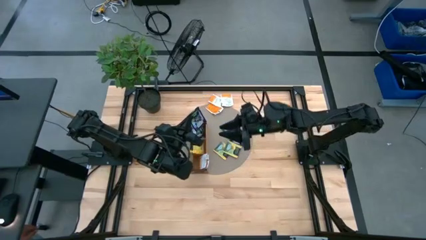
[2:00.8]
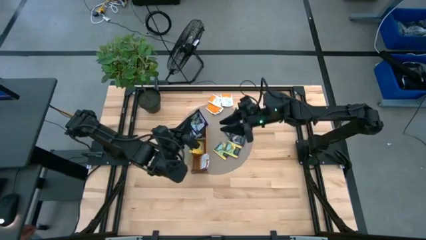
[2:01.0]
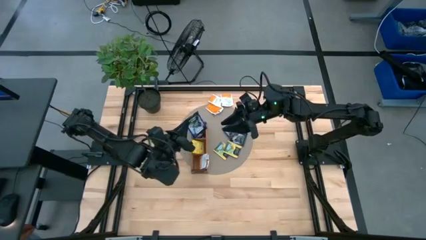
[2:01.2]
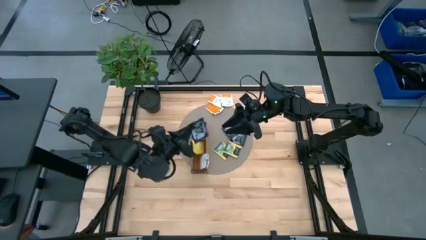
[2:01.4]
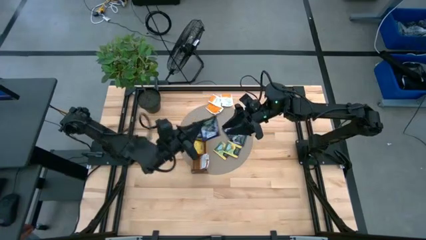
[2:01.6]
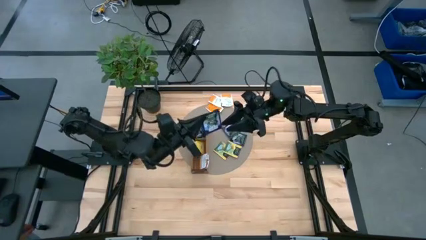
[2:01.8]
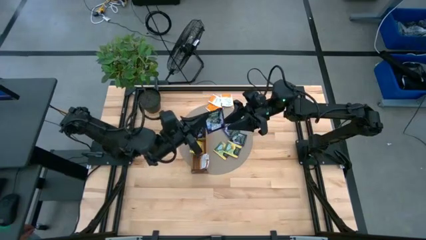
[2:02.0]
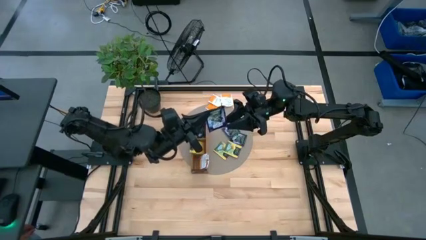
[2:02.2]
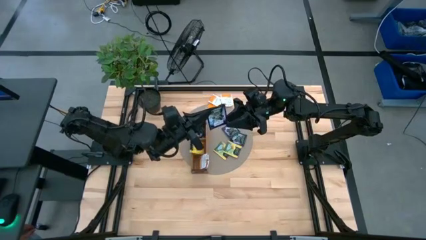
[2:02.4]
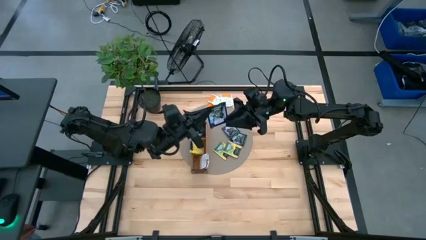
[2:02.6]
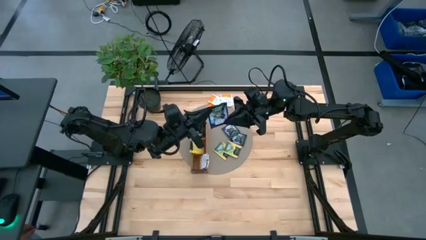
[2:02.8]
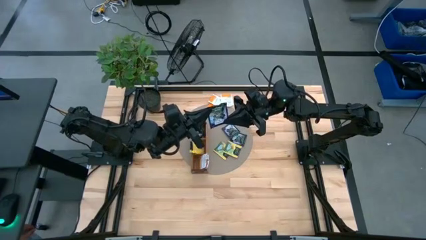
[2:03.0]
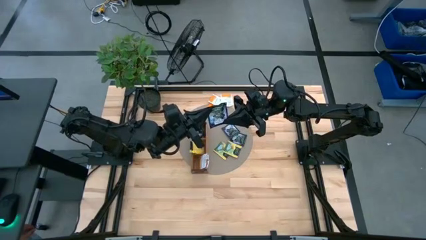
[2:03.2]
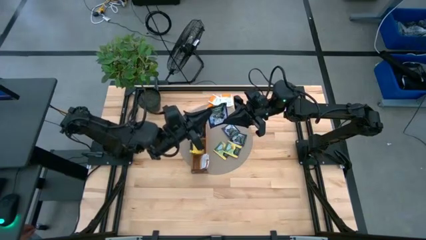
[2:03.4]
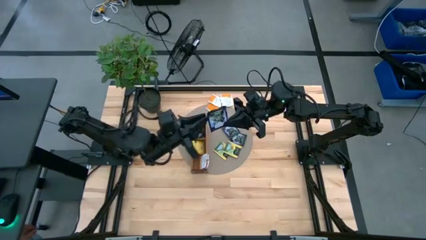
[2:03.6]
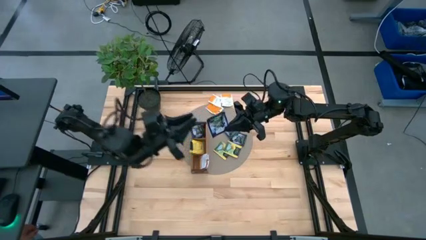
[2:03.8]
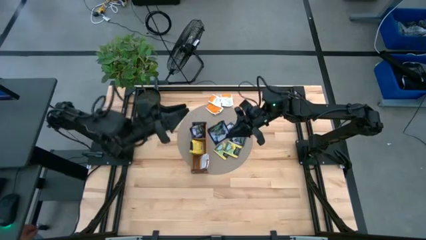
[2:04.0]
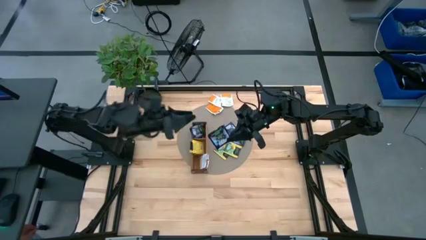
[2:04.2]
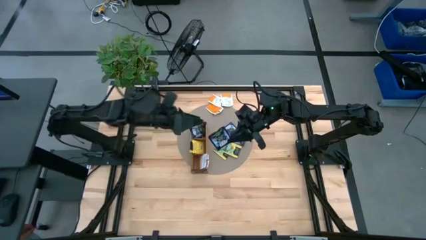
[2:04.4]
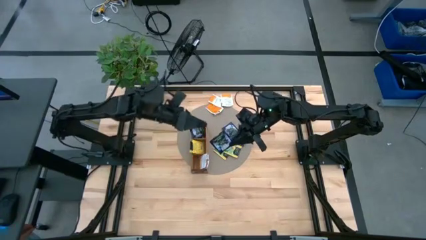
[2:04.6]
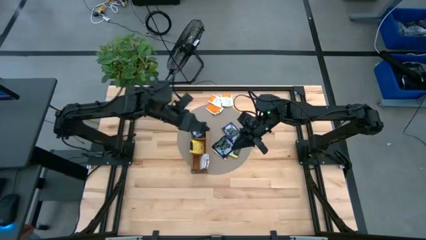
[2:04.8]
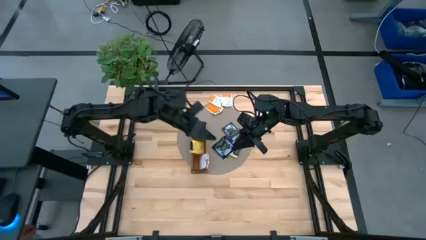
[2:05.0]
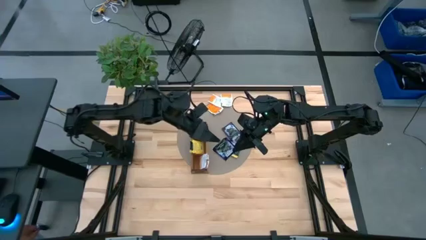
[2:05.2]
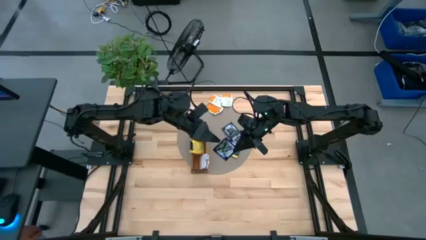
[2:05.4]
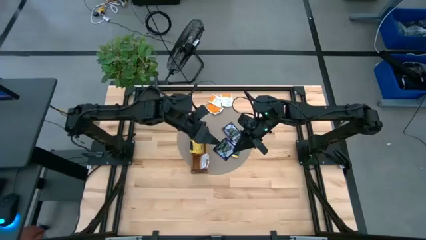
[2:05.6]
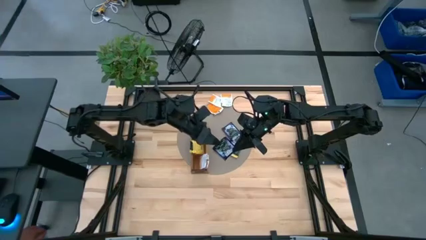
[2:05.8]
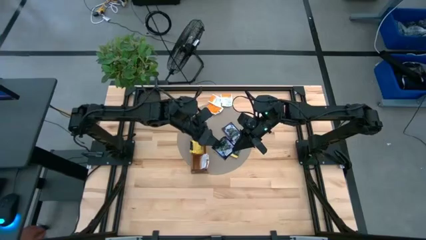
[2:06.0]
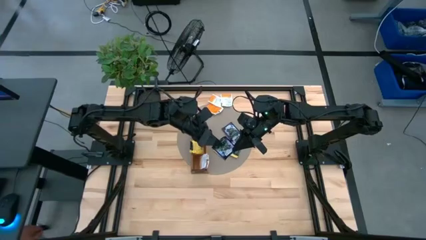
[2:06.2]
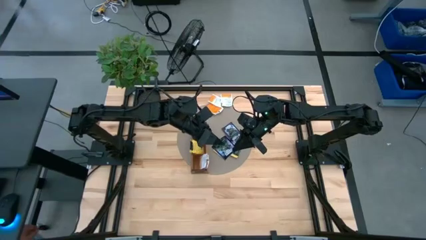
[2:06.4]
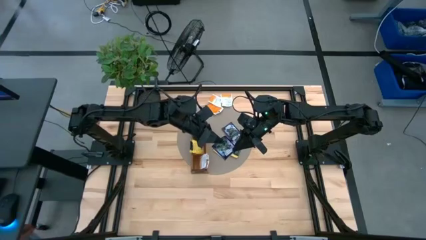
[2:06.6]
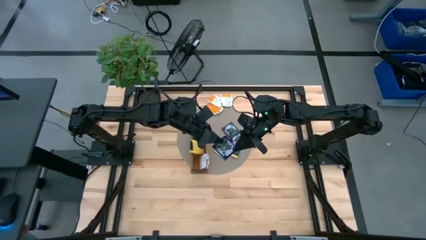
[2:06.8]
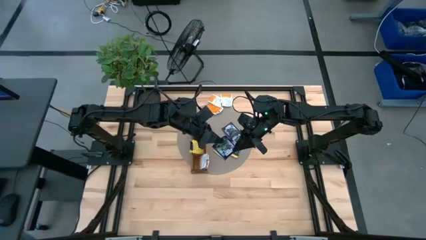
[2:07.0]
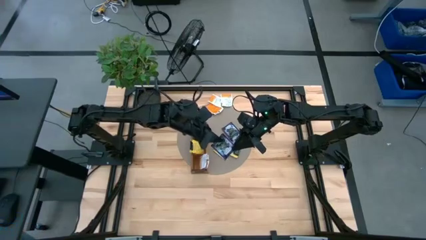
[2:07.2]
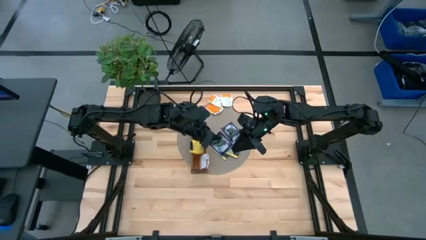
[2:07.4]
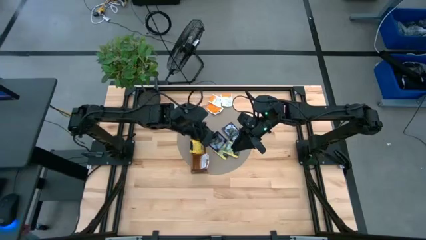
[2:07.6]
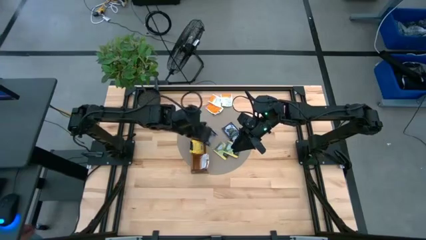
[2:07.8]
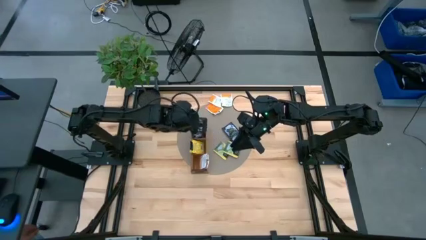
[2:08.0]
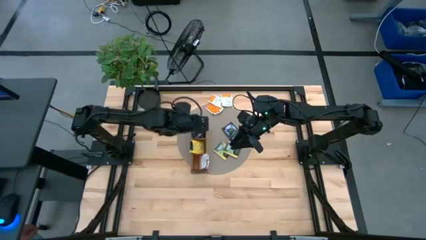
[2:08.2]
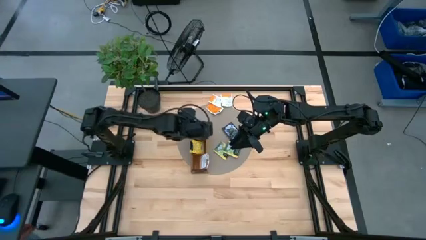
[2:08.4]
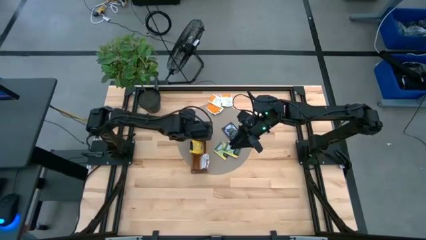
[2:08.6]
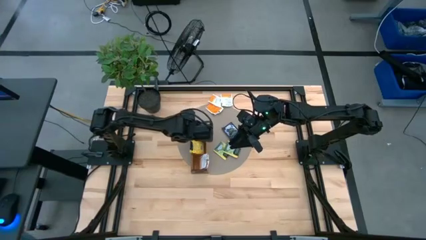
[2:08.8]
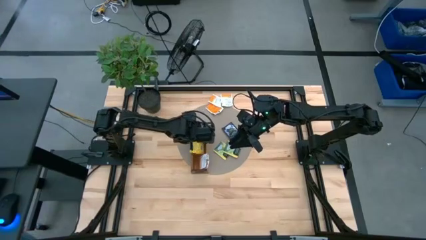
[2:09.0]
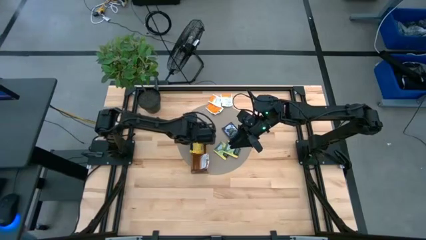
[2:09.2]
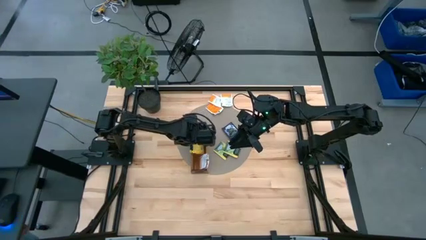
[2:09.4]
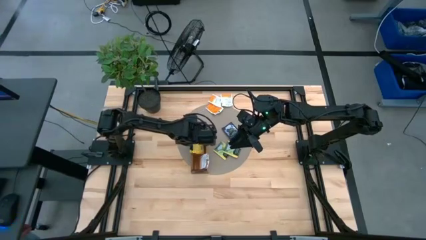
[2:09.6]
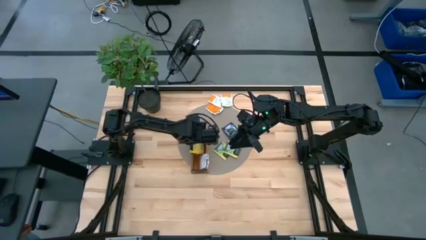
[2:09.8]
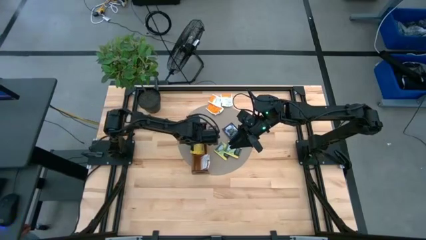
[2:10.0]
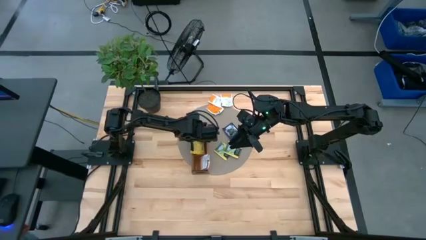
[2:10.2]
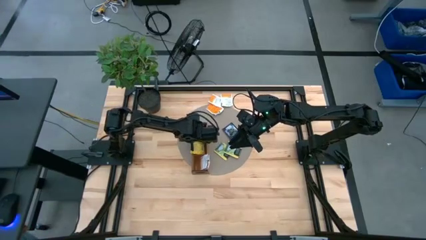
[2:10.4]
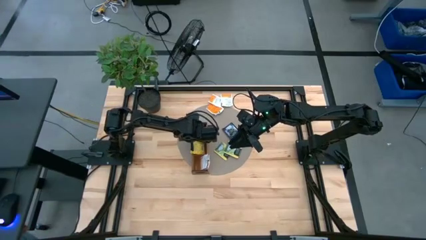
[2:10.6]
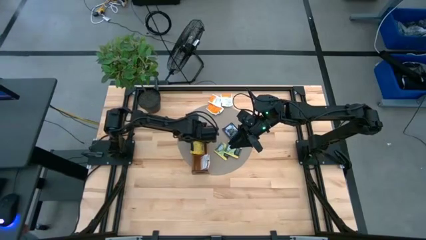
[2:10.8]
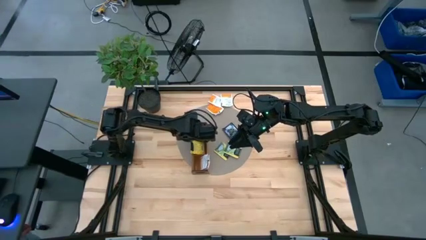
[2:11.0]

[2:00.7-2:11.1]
Task: Pick & Place Tea
Put the violet tea bag into the top section of the wooden organizer
